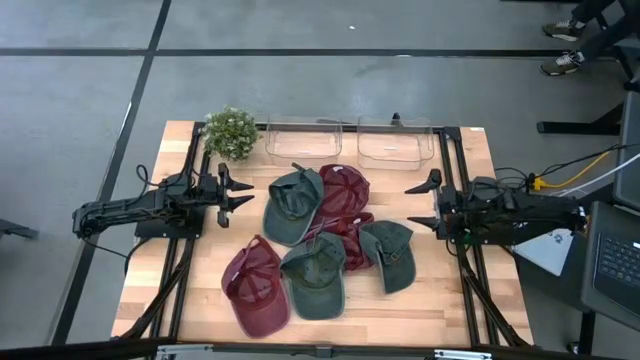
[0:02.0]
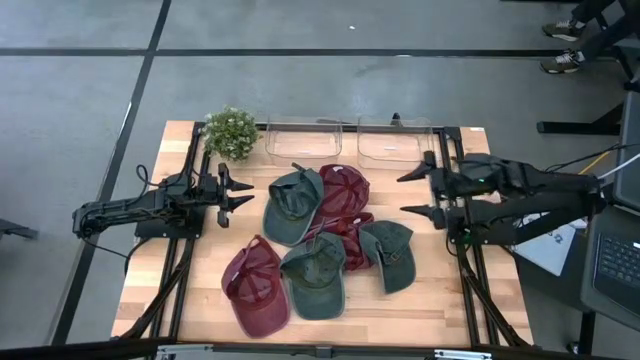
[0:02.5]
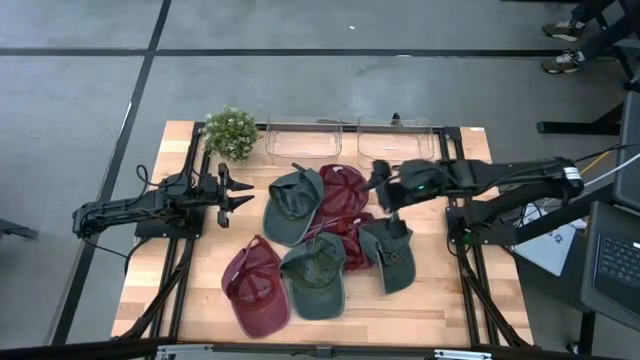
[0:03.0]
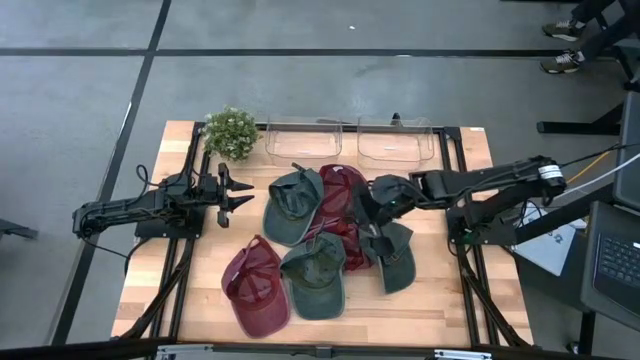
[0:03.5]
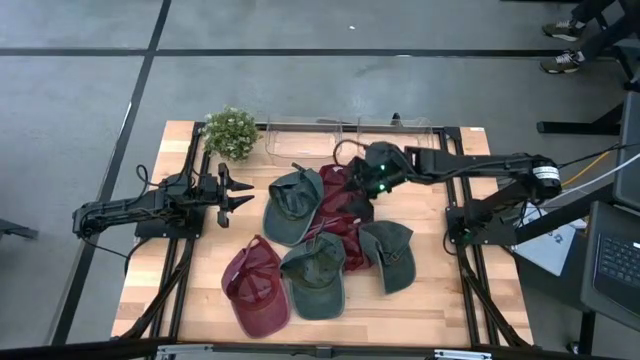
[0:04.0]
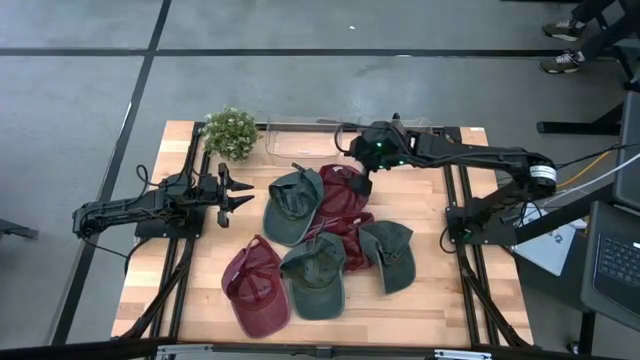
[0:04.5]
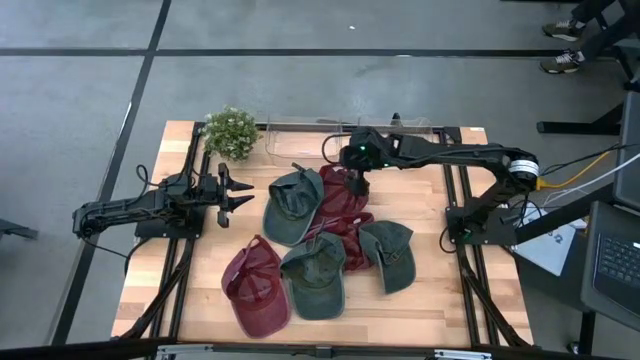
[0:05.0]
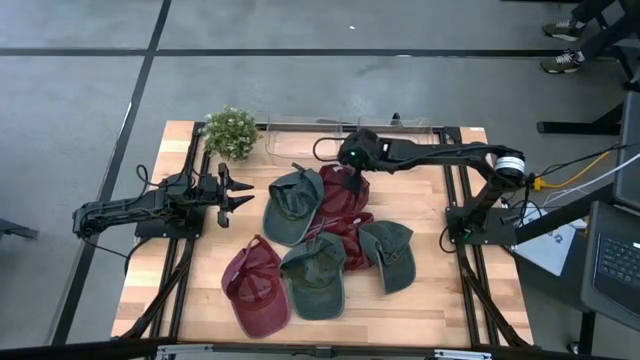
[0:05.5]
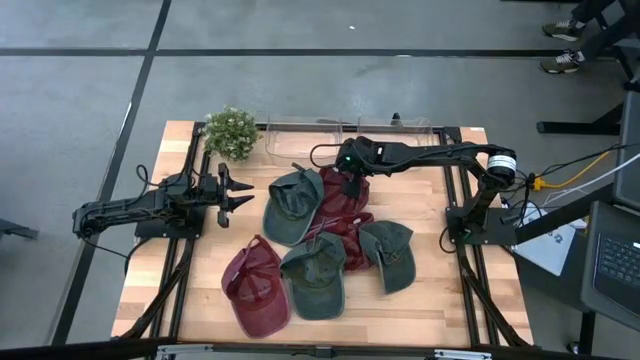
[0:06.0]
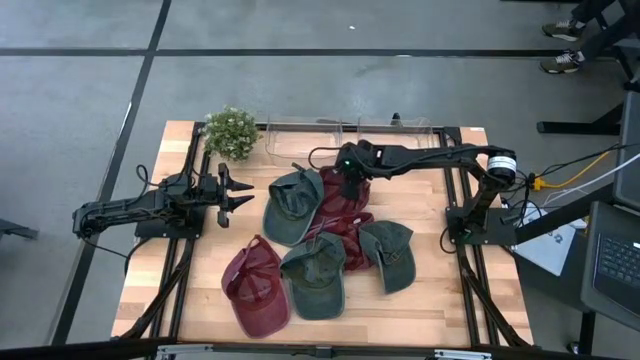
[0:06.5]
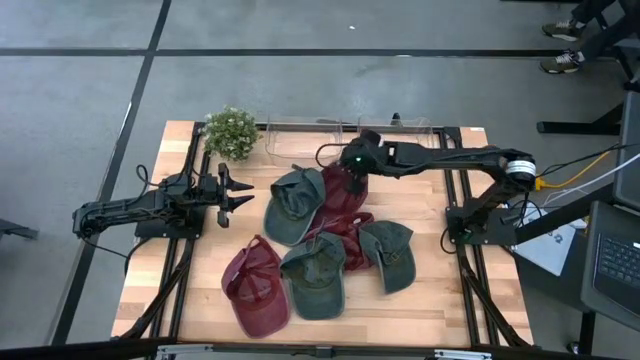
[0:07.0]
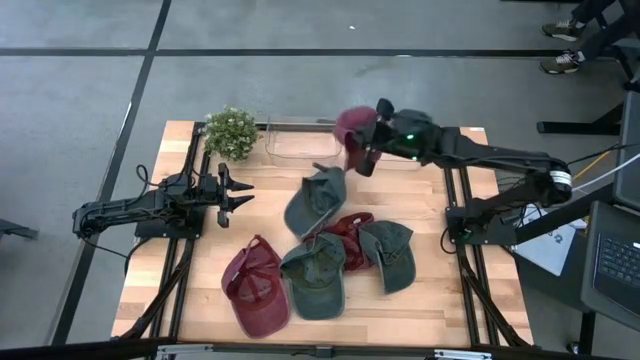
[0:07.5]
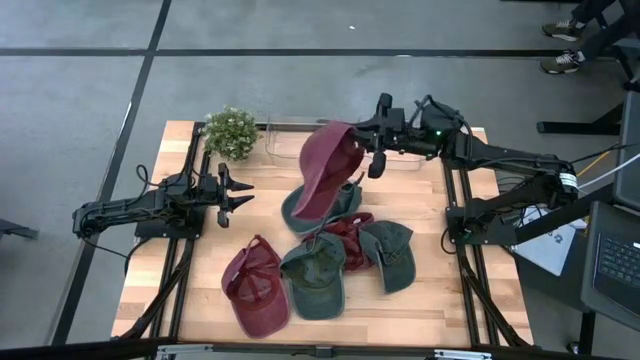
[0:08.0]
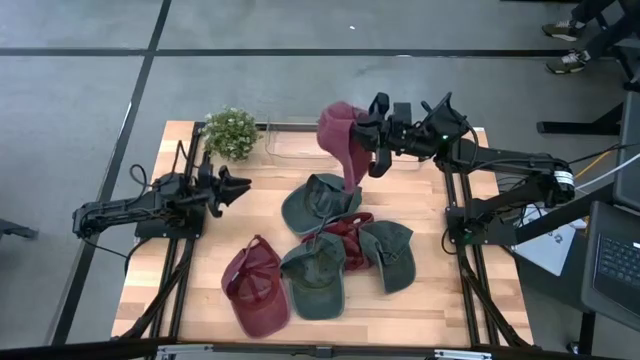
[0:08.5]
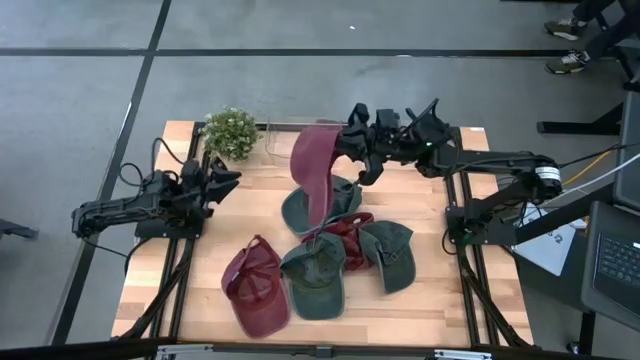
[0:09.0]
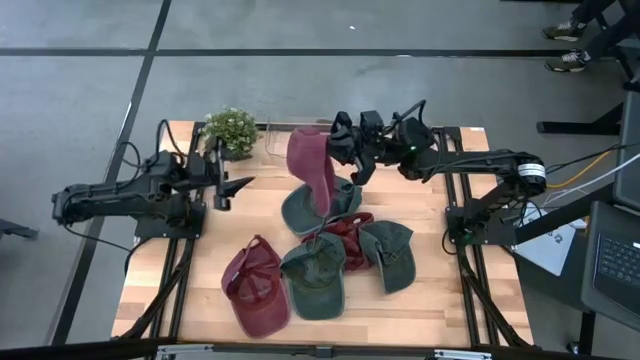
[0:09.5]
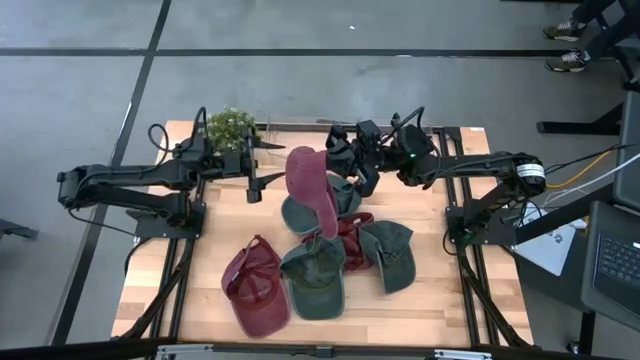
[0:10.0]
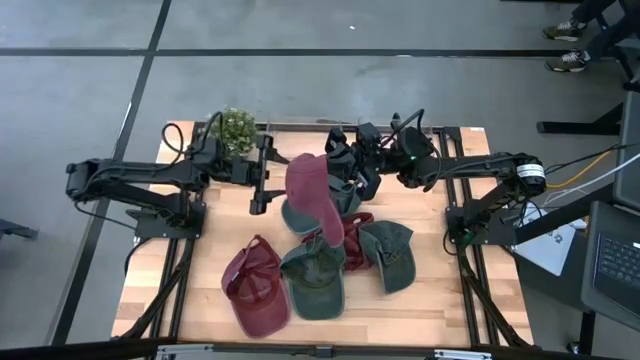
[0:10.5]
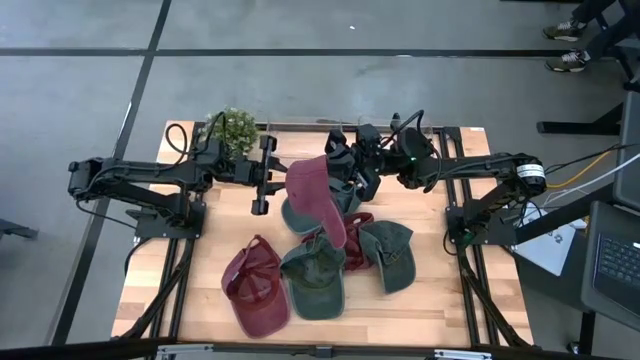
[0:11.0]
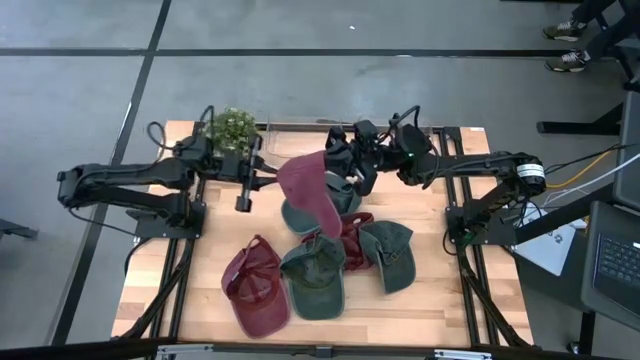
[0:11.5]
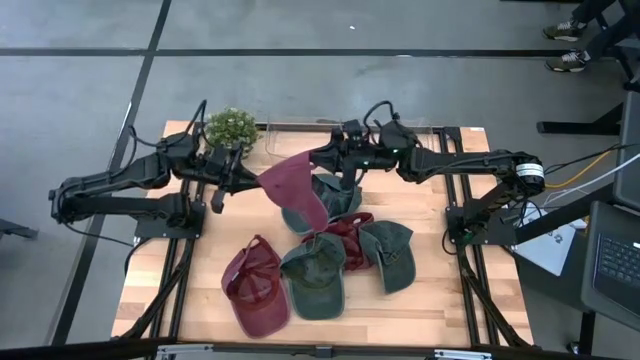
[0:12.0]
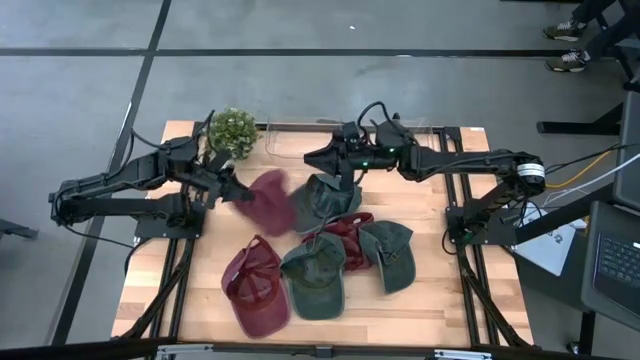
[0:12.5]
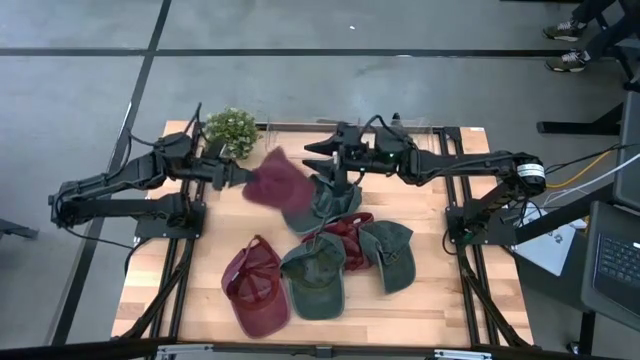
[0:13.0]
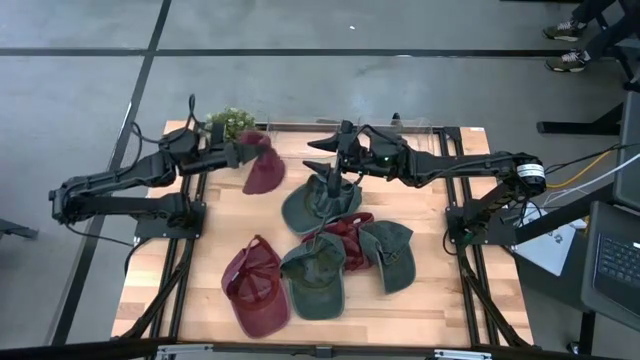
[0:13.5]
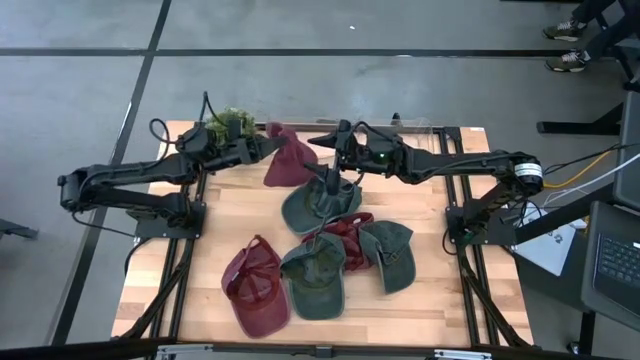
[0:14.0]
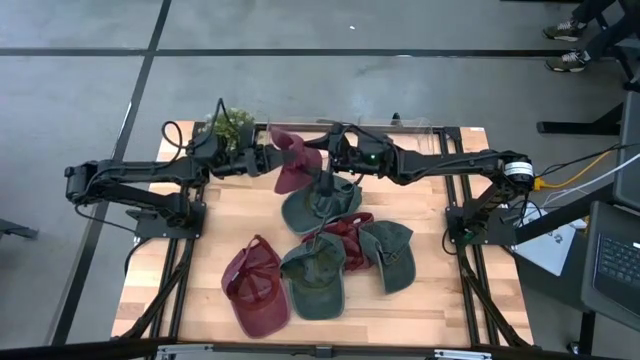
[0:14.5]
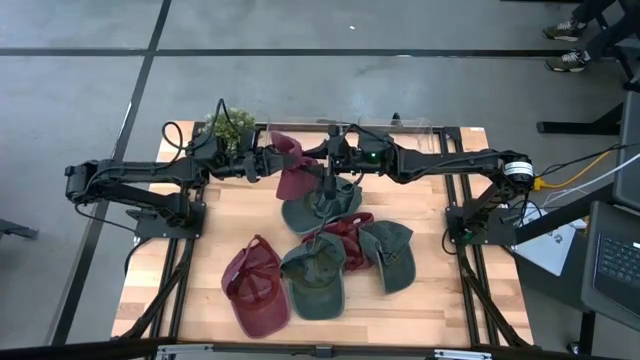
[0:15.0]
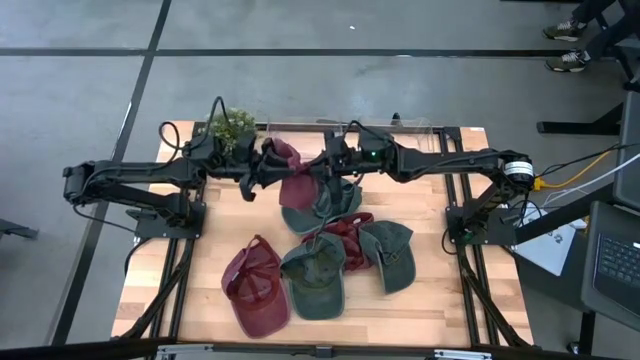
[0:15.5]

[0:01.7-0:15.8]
Task: Pick & Place hat
Put the top right red cap into the right transparent bin
